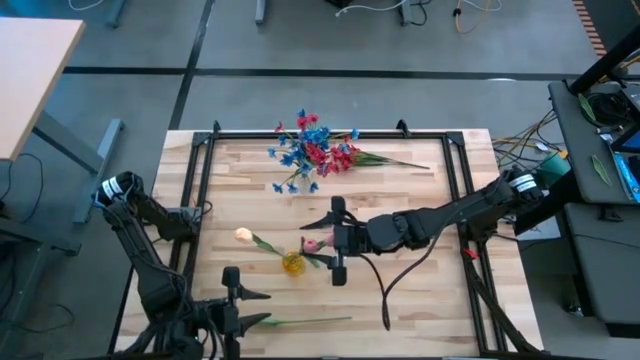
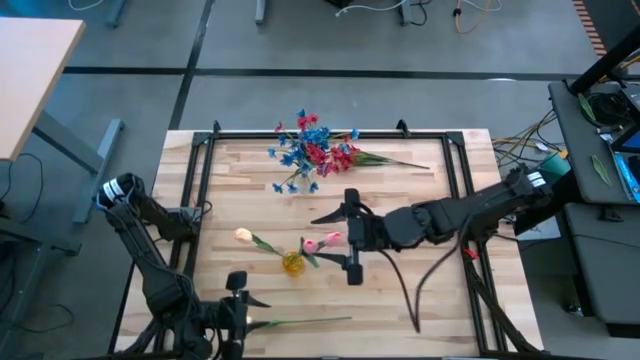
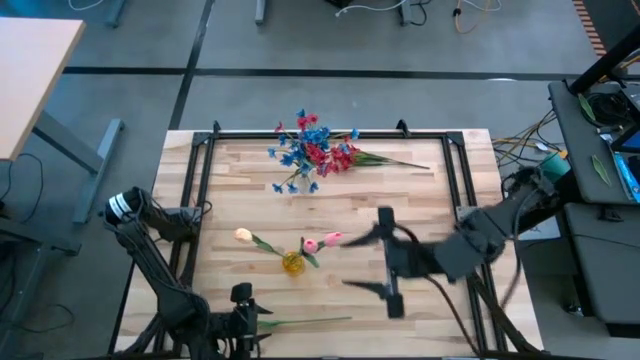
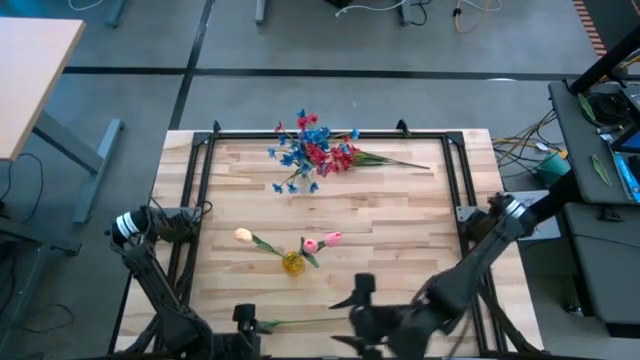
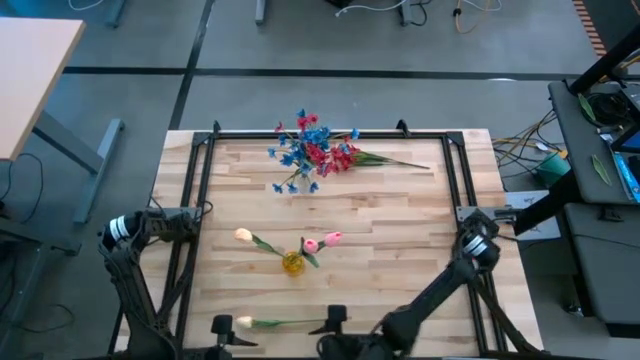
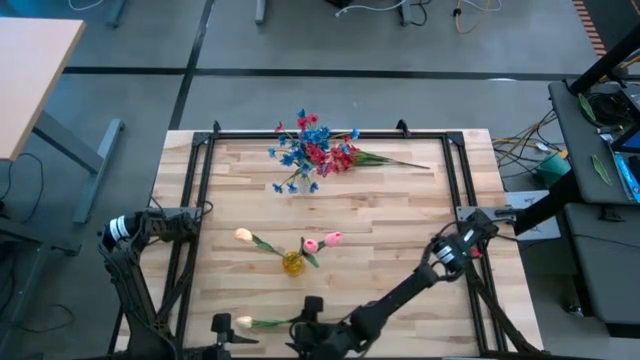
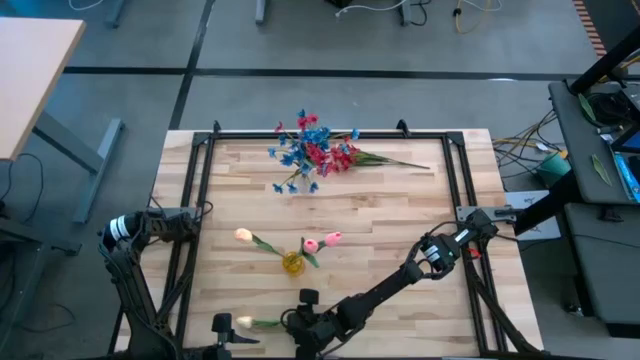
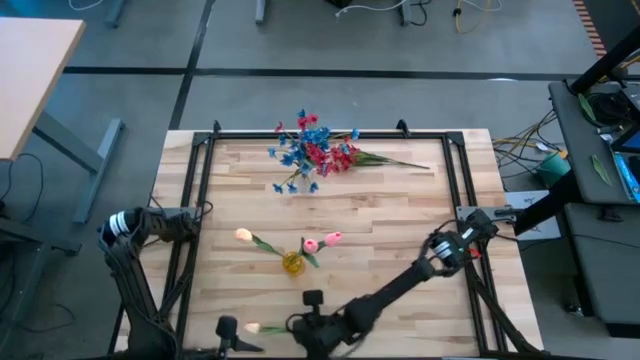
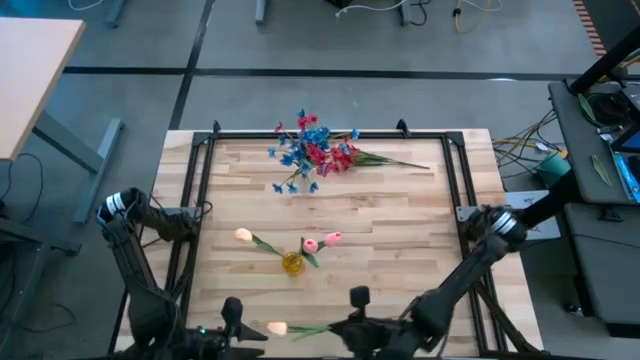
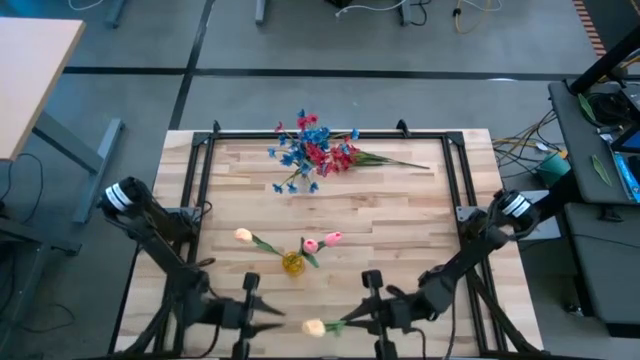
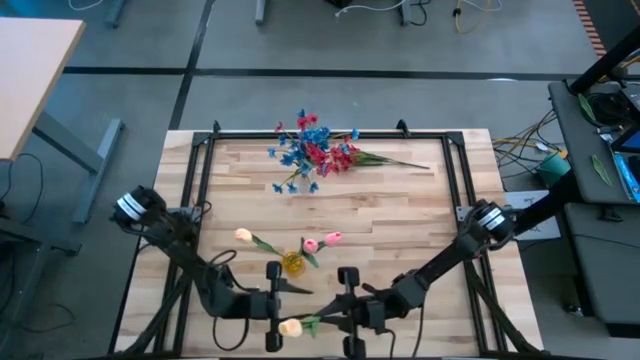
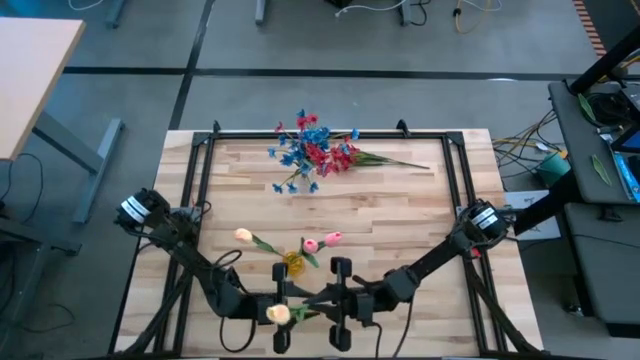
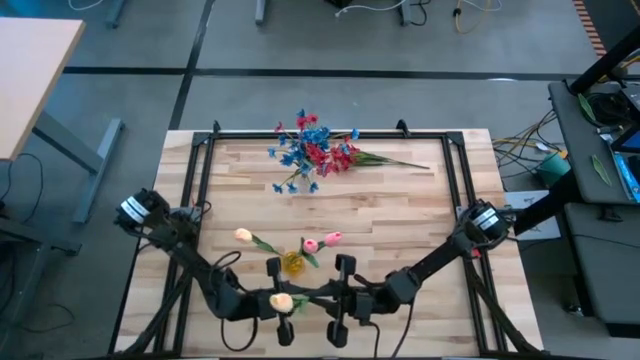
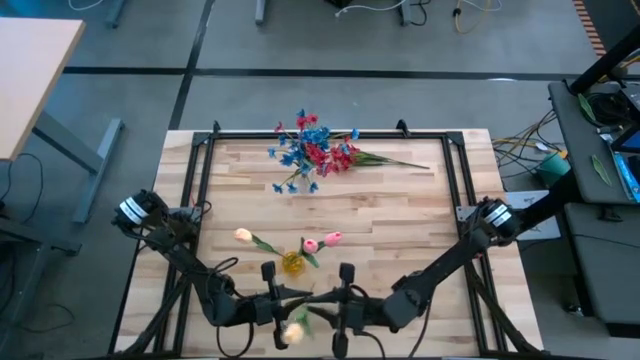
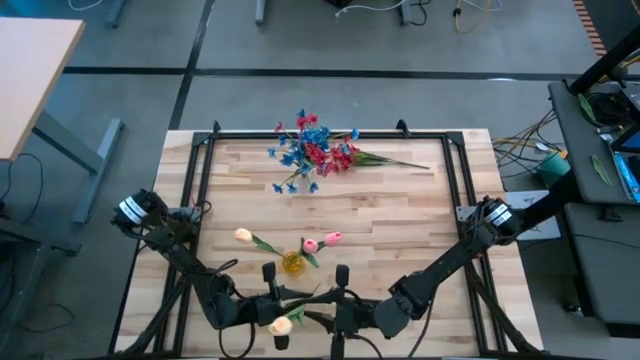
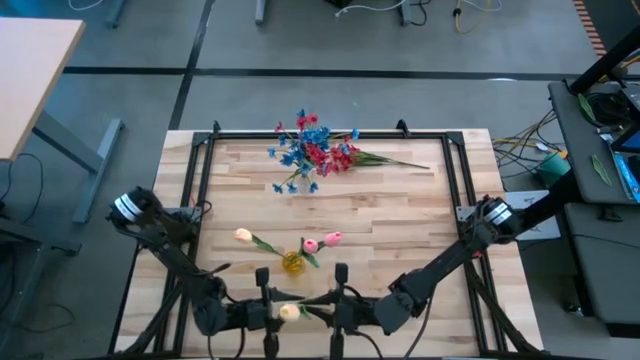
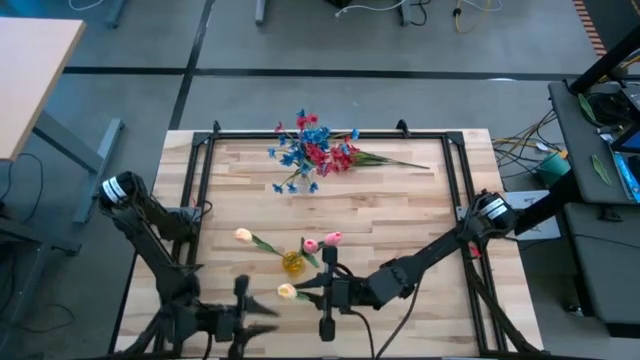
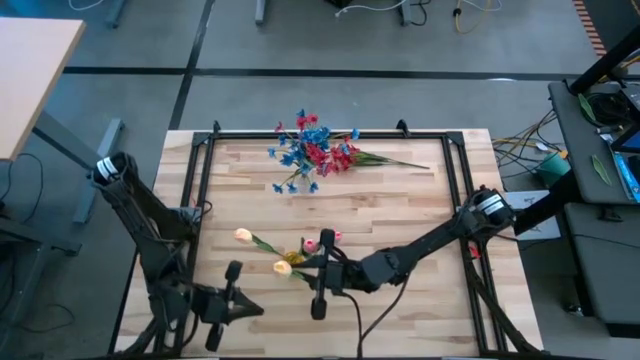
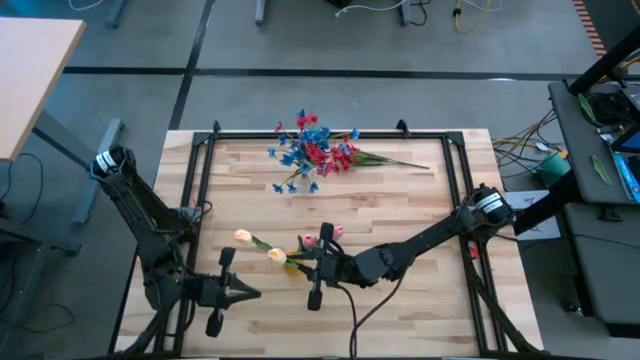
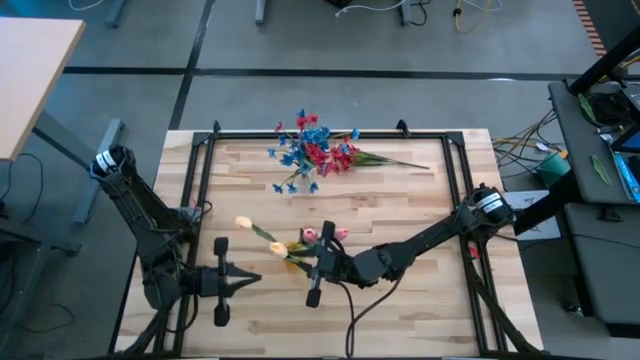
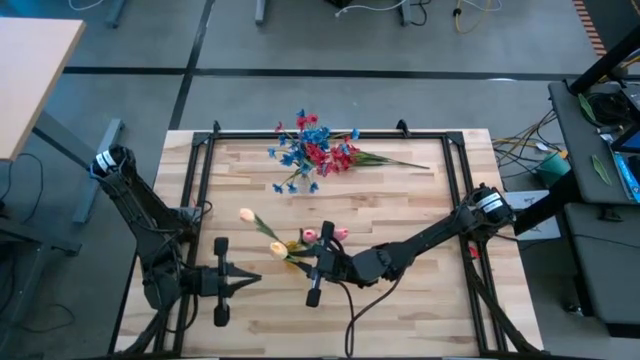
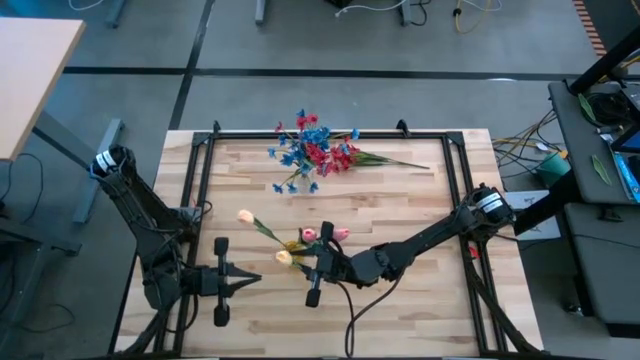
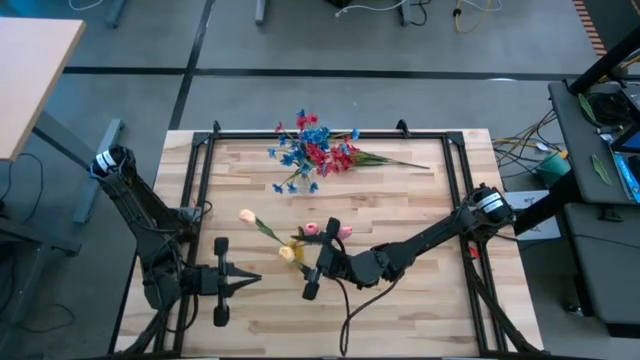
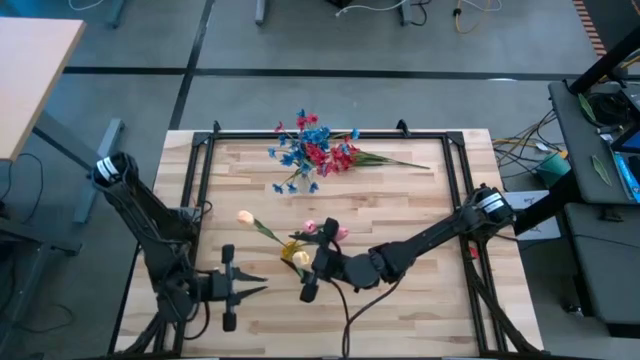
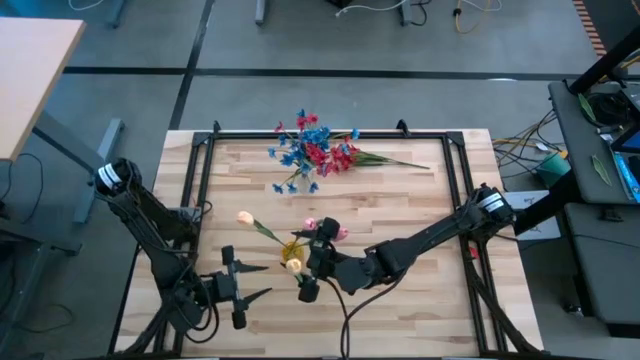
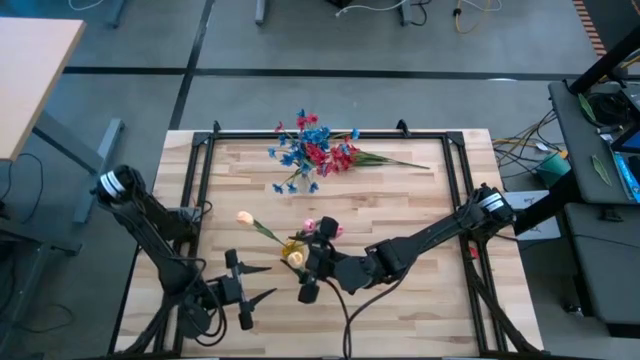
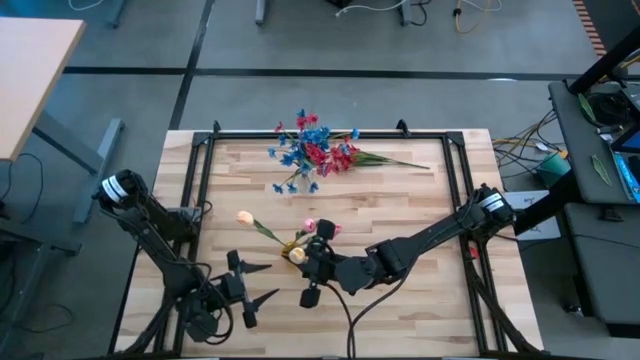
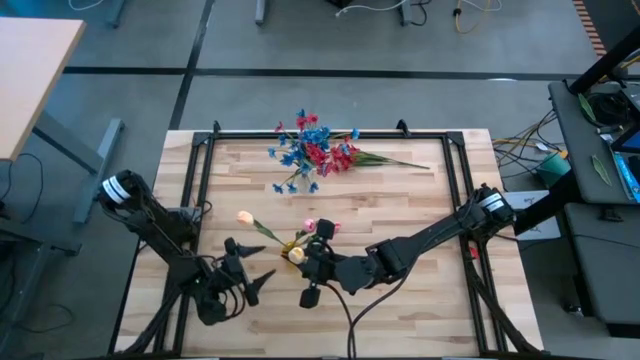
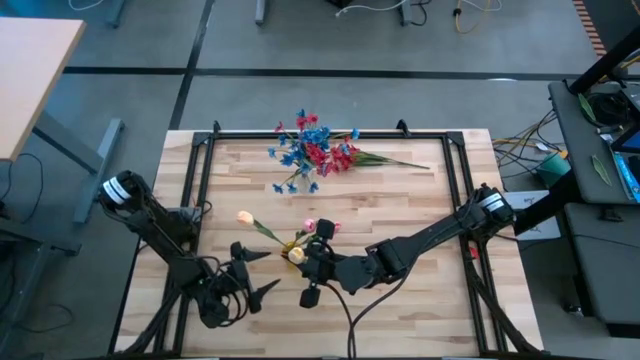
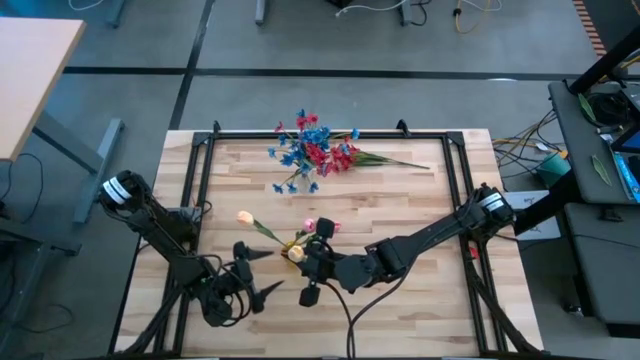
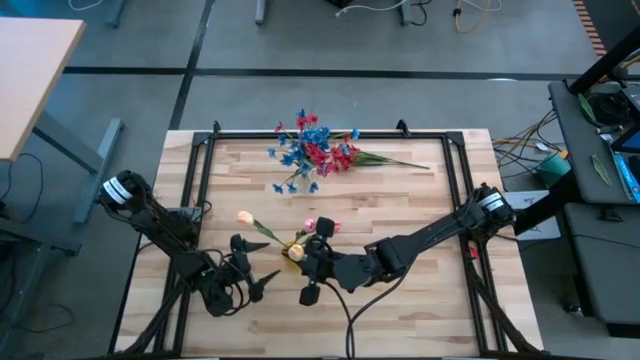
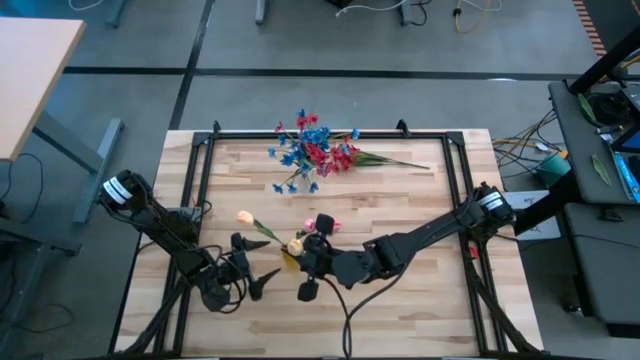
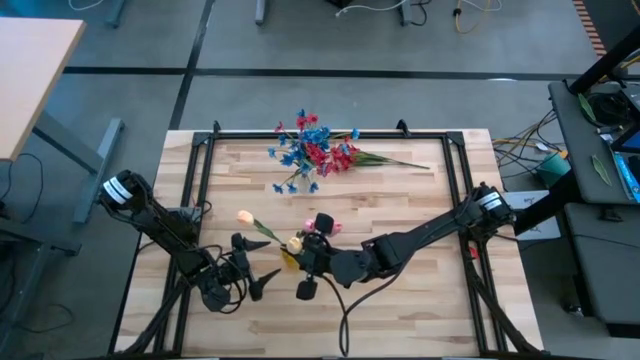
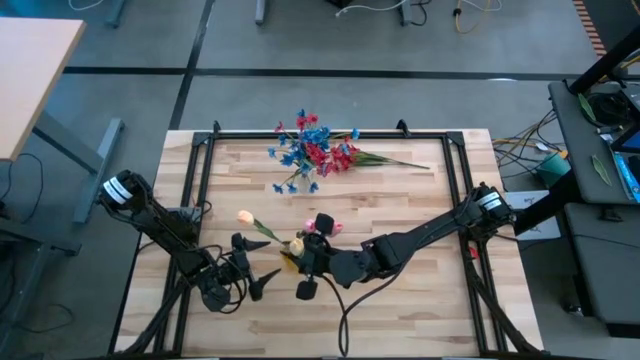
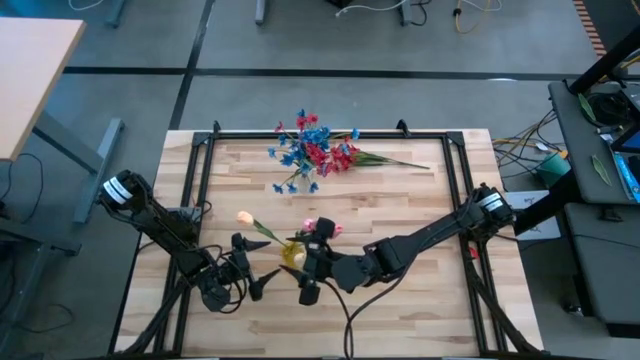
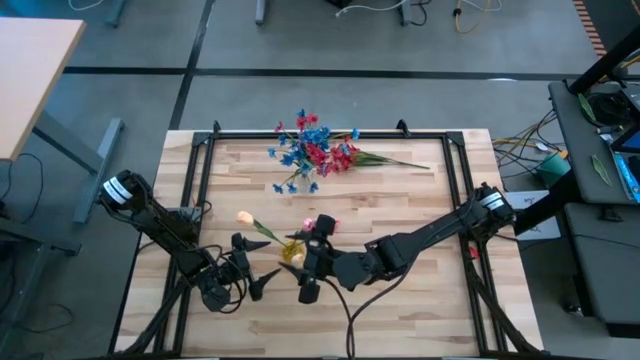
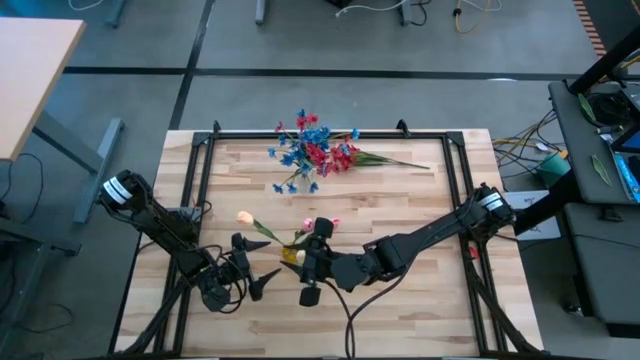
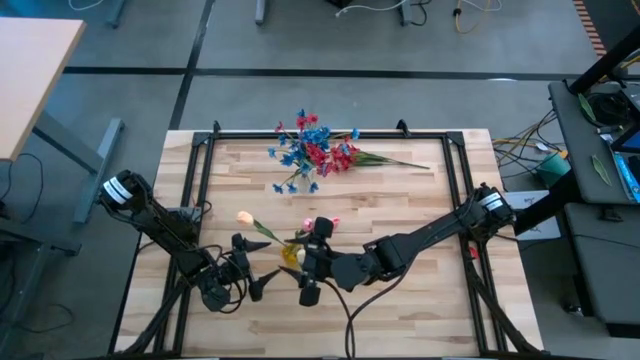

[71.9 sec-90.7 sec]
Task: Sort flowers into vase by color
Put the light yellow tulip into the yellow vase

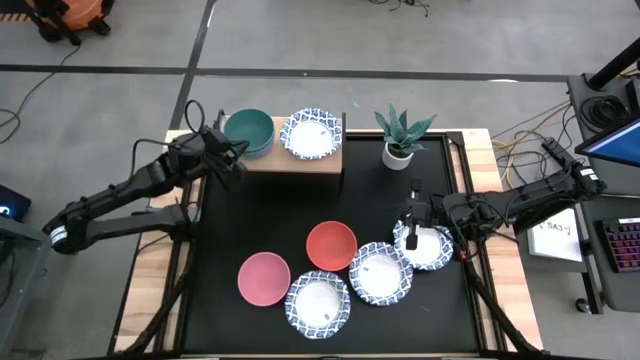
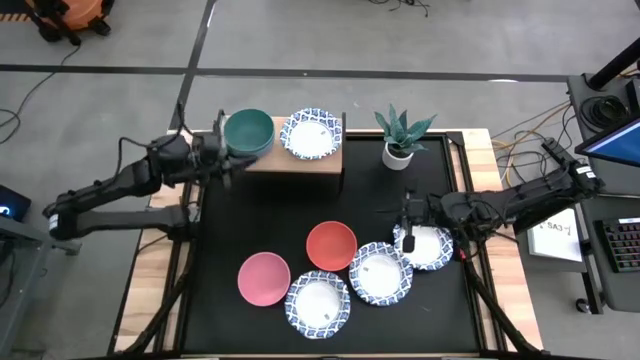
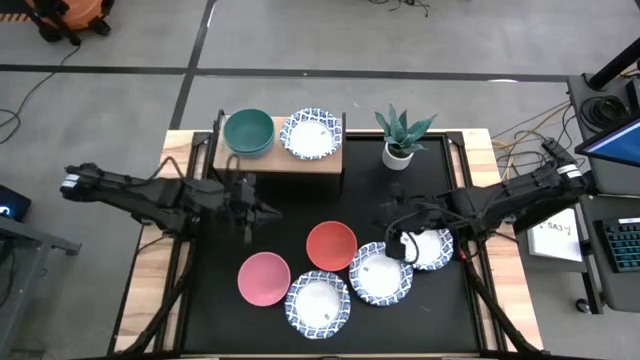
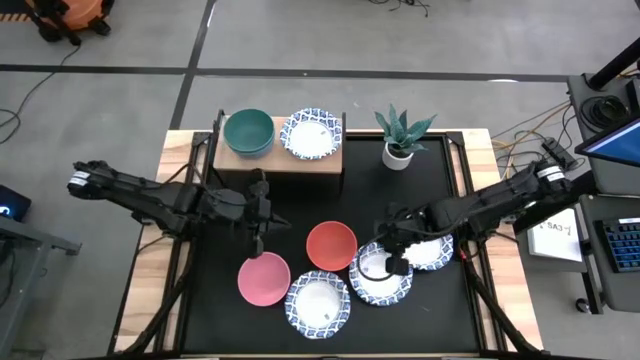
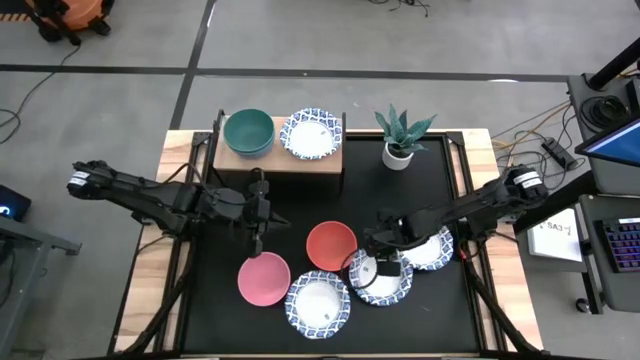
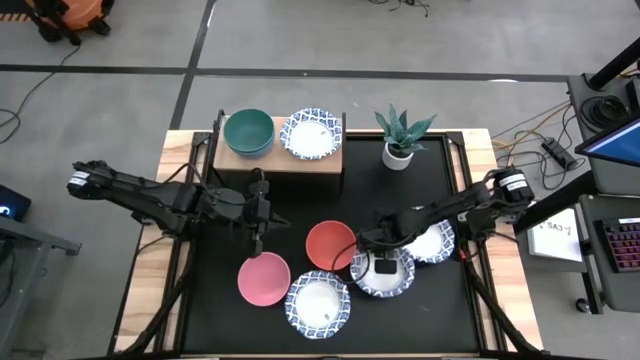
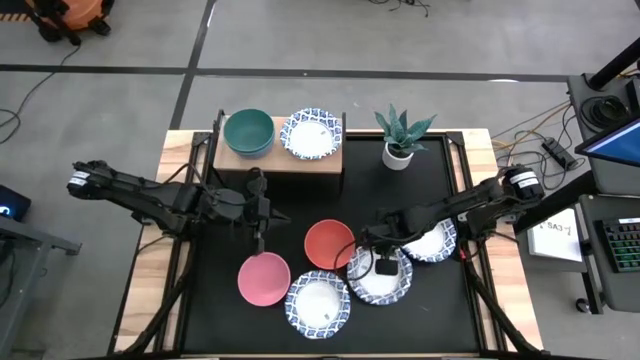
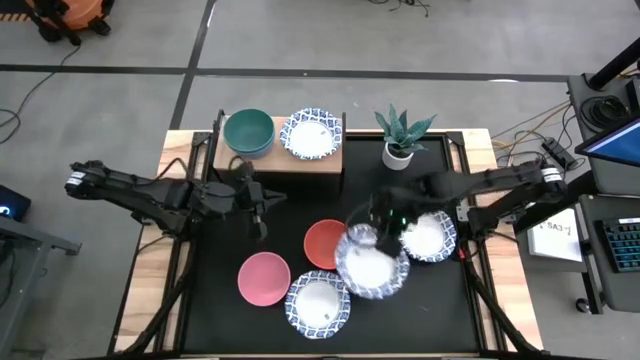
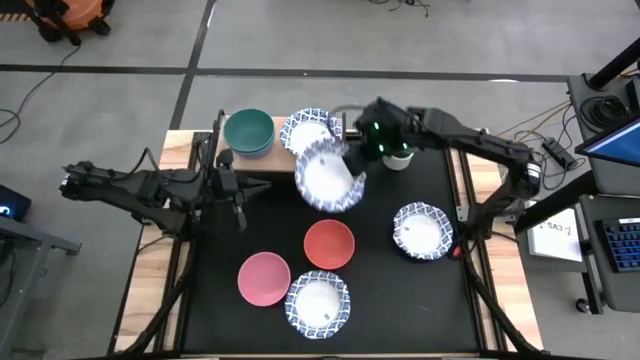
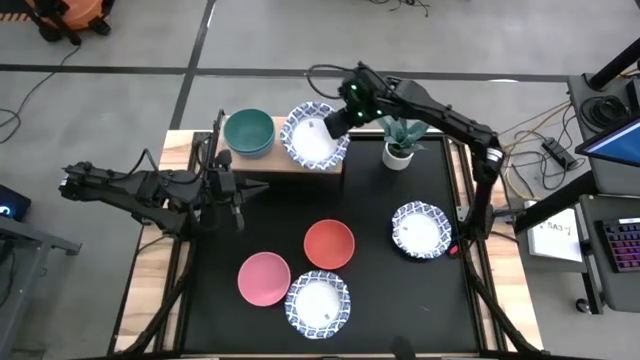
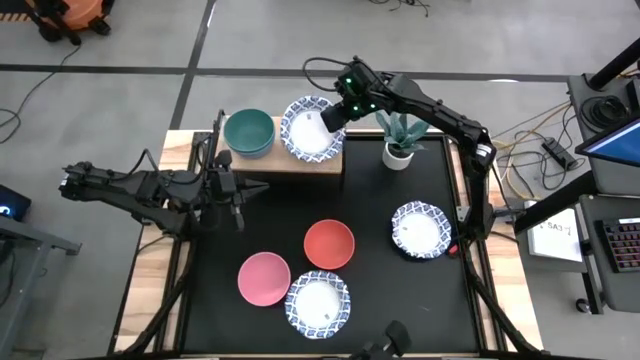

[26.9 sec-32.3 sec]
Task: Place and stack bowls onto a shelf
Stack the middle white patterned bowl on top of the other white patterned bowl on the shelf
